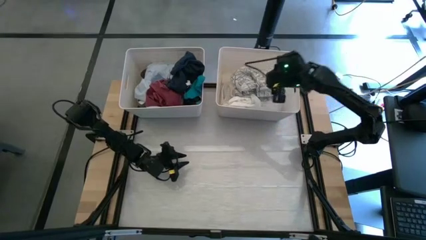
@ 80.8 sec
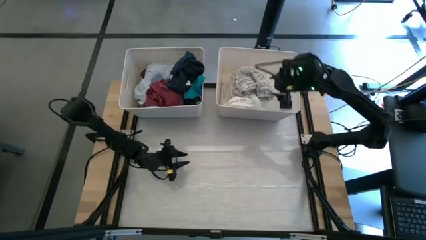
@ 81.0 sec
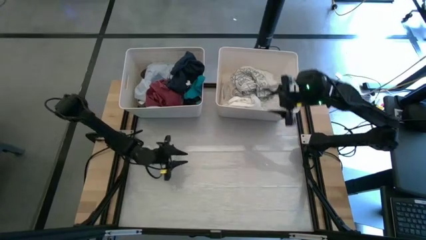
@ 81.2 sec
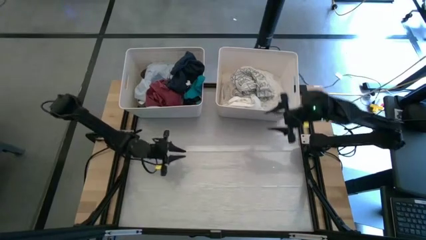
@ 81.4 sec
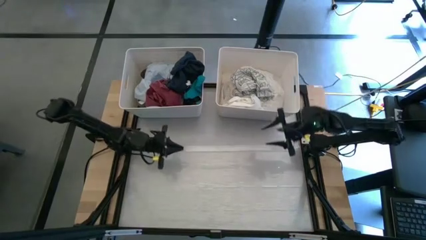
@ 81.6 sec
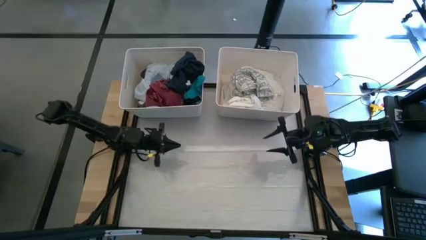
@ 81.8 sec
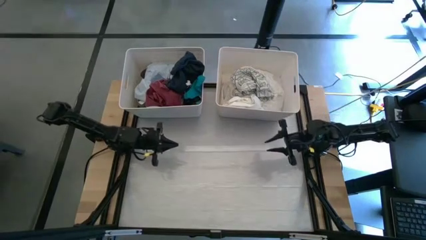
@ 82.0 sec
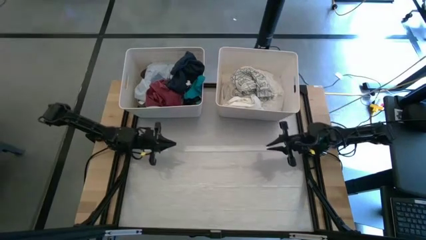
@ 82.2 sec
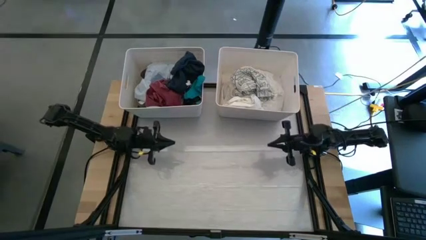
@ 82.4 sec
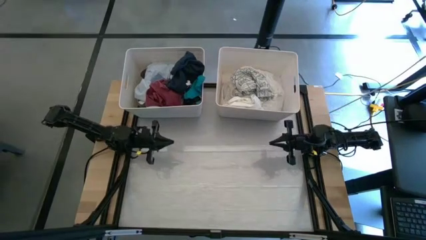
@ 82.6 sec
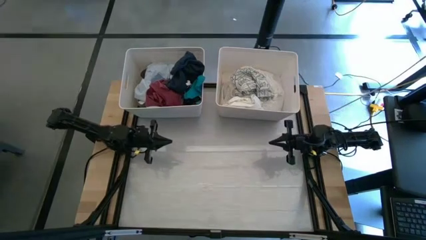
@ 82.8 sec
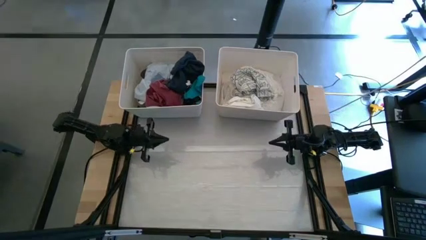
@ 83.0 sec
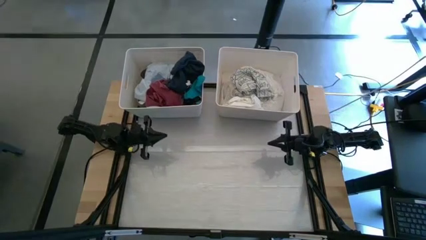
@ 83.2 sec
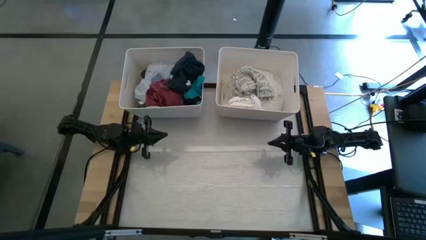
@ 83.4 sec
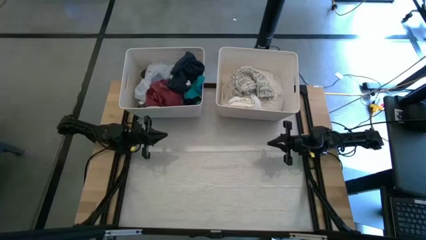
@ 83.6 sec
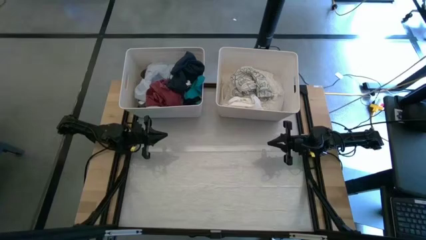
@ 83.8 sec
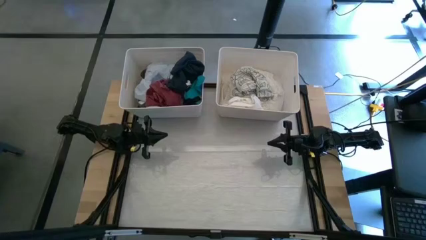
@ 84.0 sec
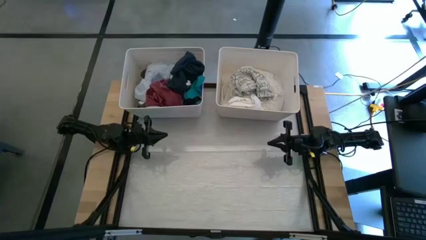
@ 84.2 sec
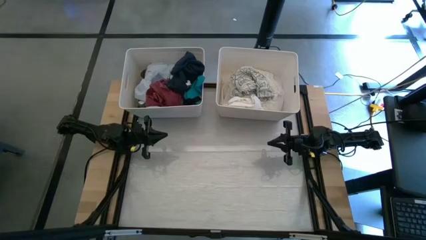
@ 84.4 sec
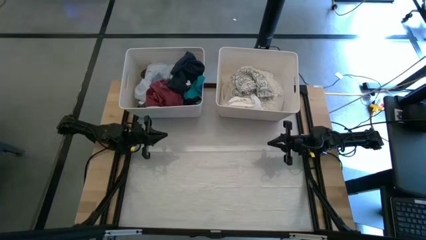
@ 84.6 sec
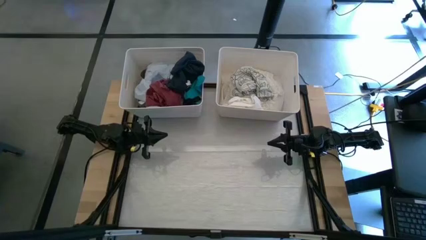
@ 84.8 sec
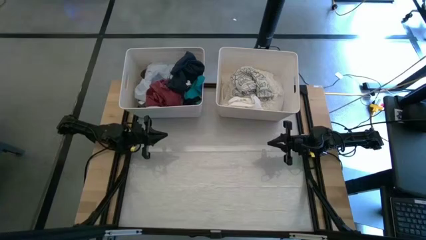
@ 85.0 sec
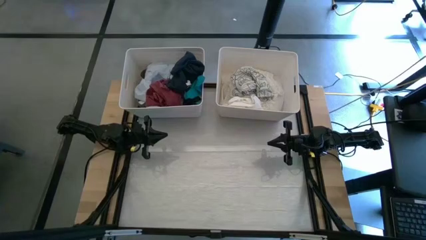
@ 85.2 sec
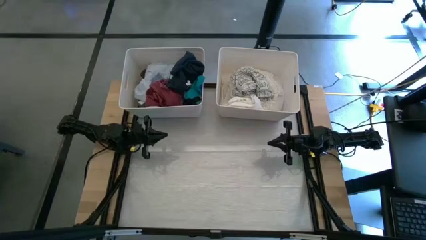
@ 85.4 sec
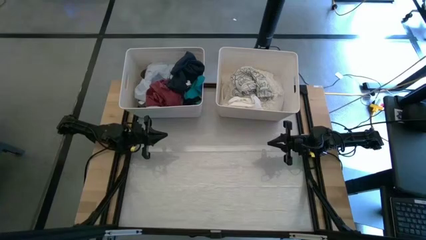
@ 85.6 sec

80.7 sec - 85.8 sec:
Task: Sort clothes
Return to Home Position

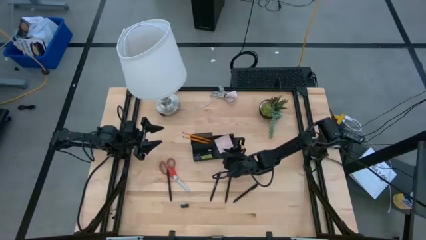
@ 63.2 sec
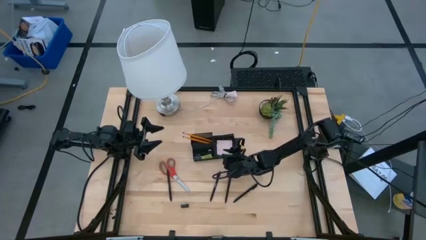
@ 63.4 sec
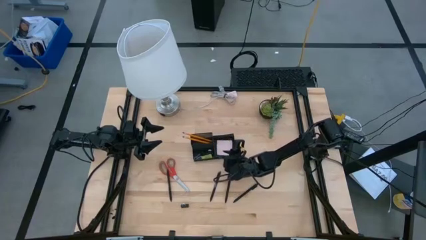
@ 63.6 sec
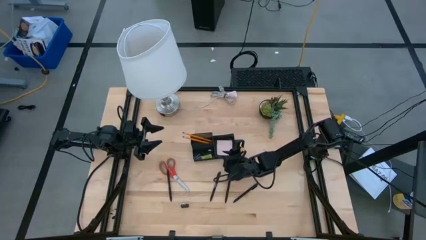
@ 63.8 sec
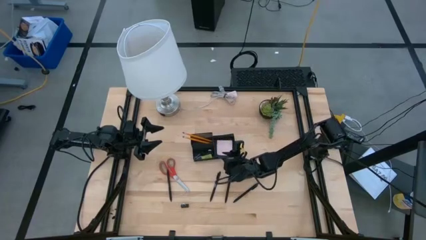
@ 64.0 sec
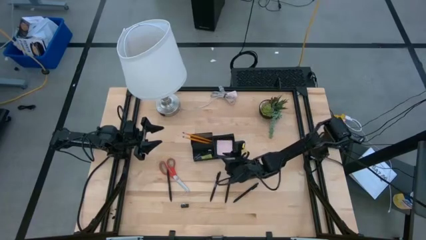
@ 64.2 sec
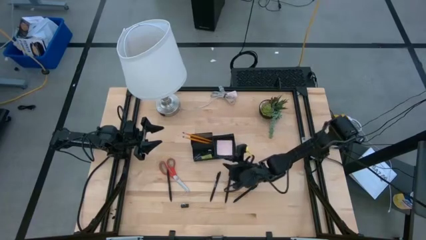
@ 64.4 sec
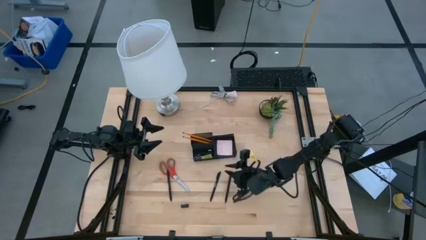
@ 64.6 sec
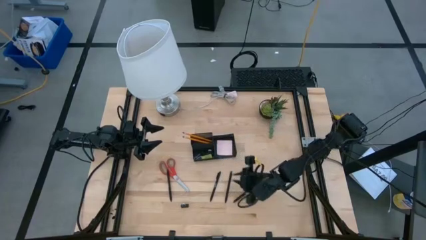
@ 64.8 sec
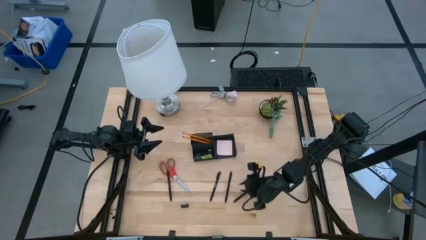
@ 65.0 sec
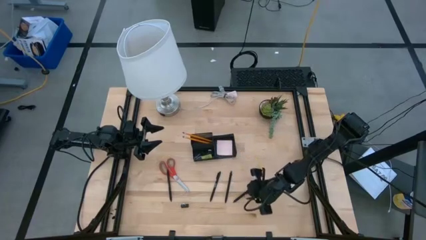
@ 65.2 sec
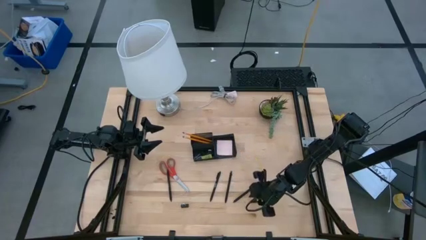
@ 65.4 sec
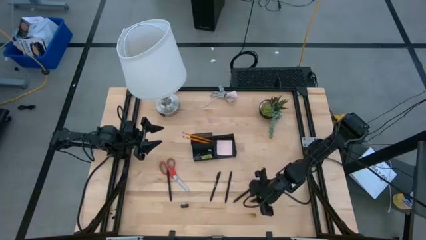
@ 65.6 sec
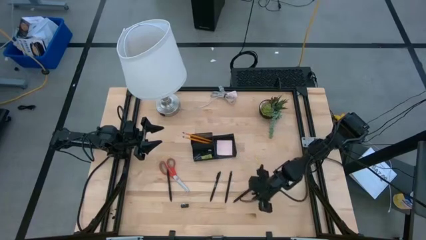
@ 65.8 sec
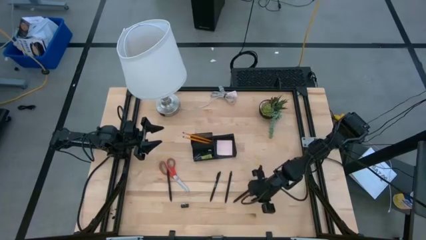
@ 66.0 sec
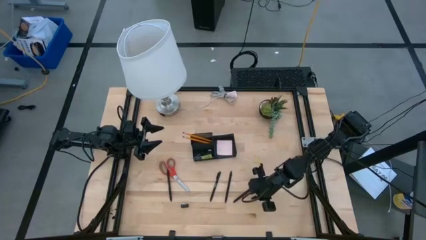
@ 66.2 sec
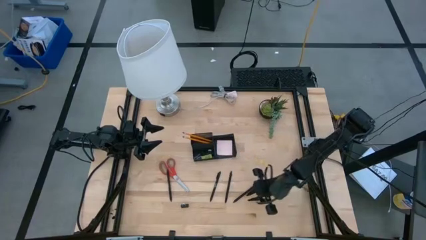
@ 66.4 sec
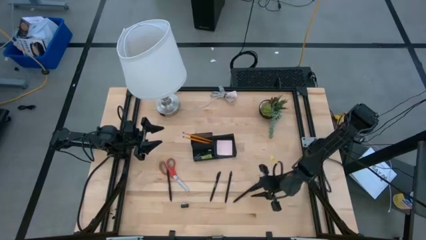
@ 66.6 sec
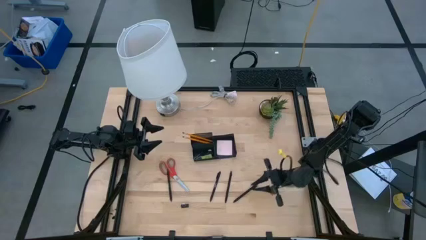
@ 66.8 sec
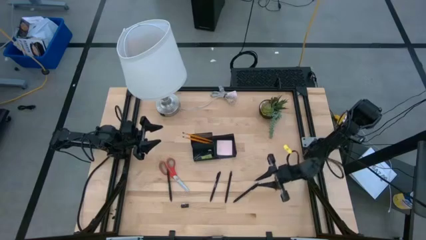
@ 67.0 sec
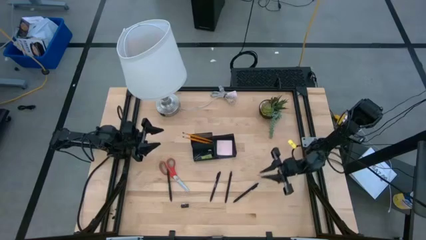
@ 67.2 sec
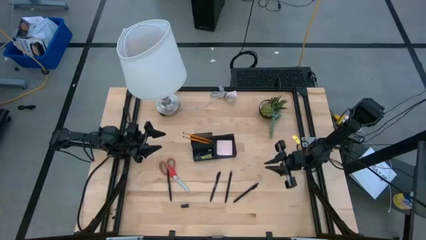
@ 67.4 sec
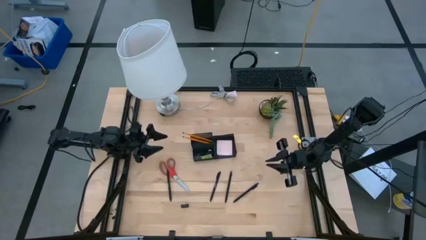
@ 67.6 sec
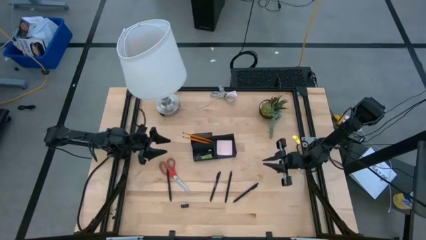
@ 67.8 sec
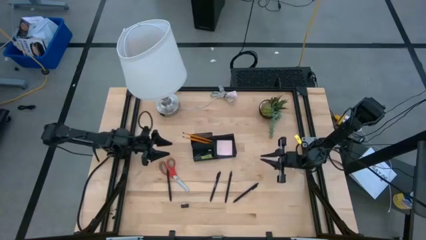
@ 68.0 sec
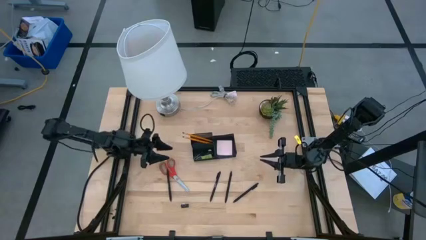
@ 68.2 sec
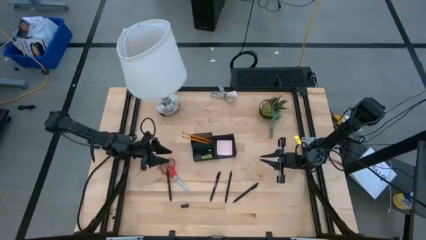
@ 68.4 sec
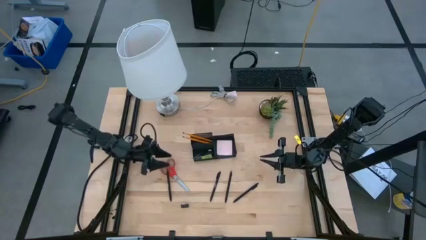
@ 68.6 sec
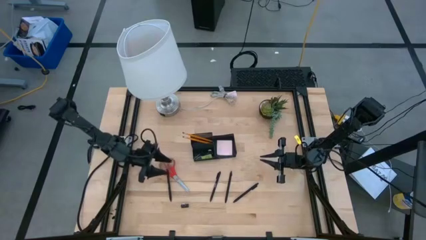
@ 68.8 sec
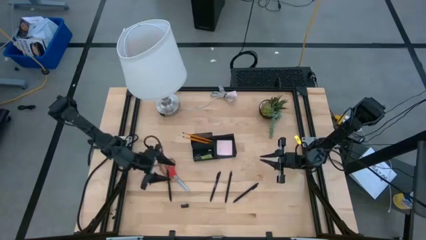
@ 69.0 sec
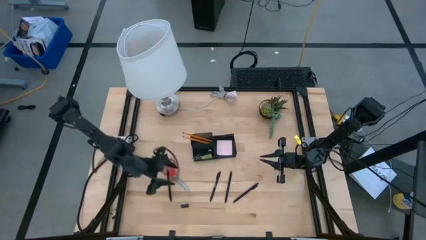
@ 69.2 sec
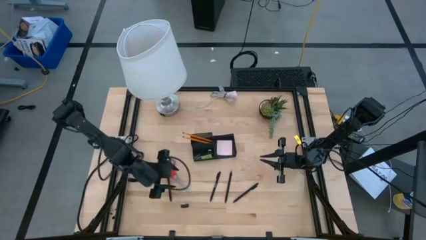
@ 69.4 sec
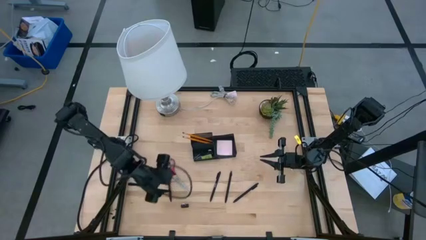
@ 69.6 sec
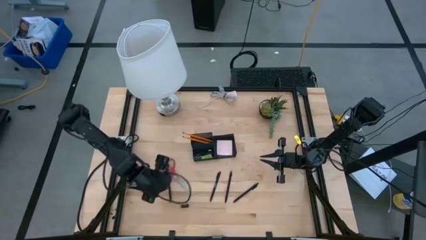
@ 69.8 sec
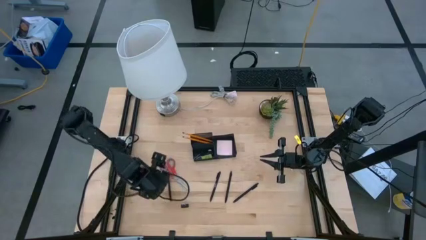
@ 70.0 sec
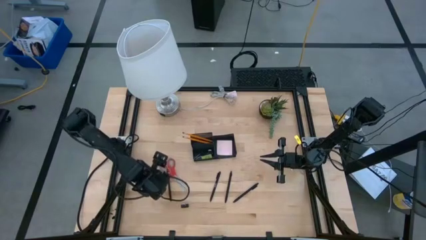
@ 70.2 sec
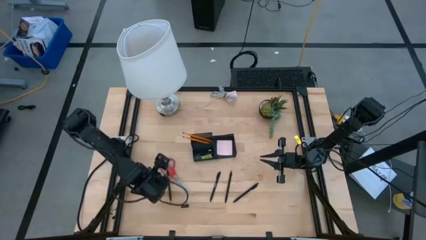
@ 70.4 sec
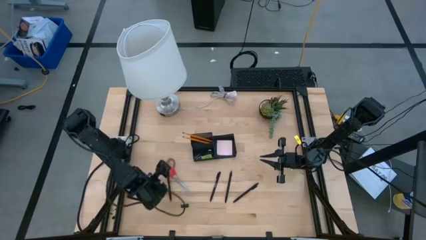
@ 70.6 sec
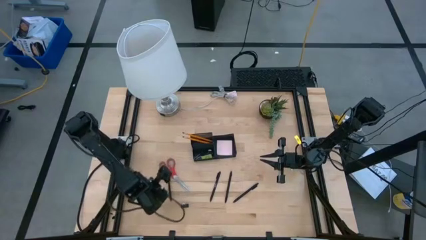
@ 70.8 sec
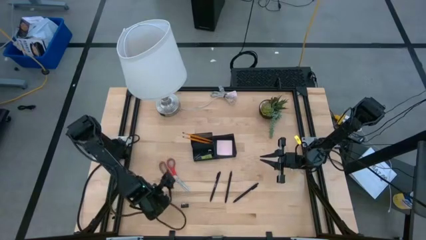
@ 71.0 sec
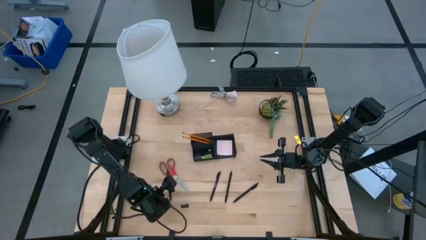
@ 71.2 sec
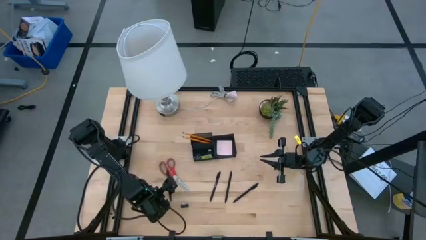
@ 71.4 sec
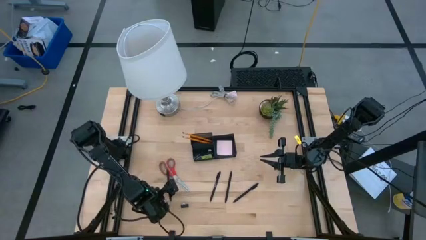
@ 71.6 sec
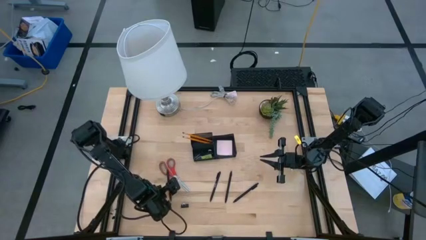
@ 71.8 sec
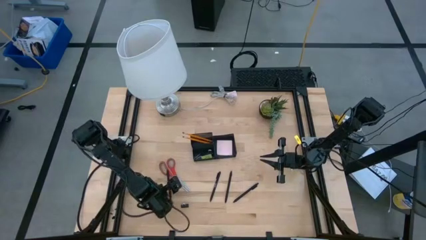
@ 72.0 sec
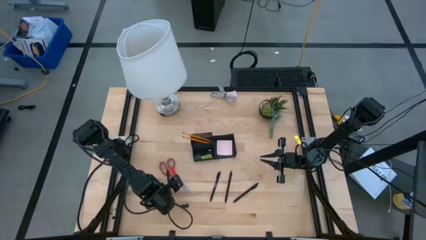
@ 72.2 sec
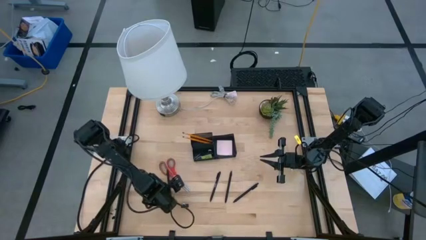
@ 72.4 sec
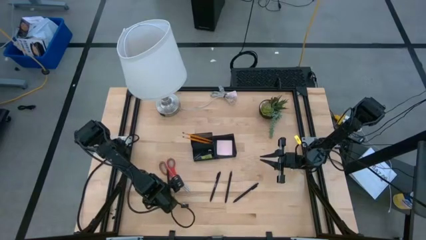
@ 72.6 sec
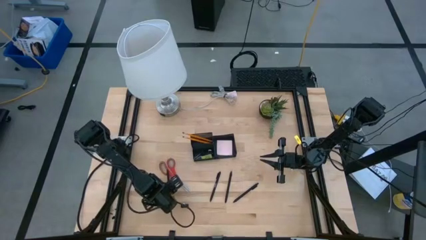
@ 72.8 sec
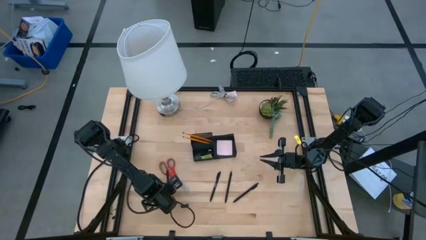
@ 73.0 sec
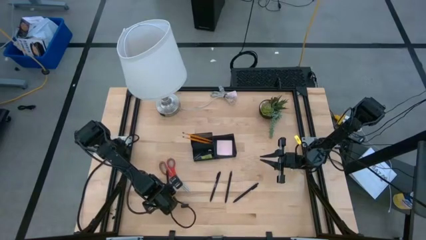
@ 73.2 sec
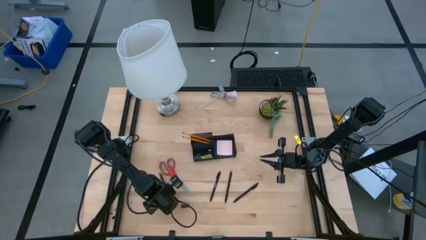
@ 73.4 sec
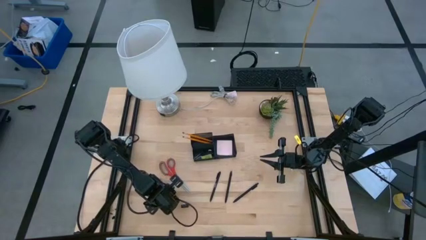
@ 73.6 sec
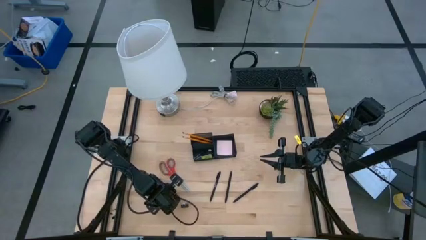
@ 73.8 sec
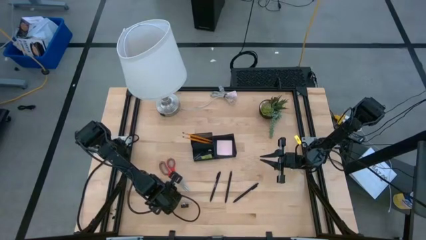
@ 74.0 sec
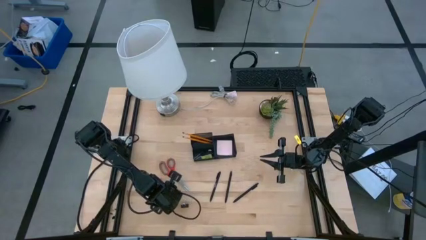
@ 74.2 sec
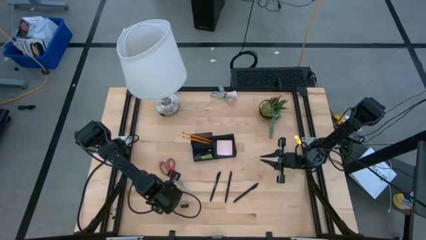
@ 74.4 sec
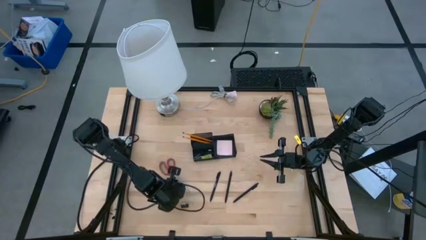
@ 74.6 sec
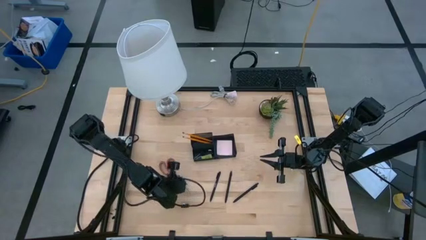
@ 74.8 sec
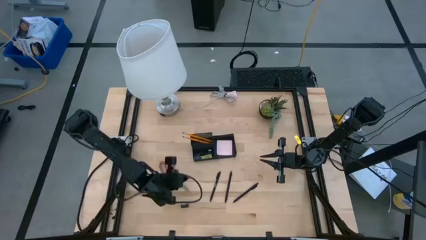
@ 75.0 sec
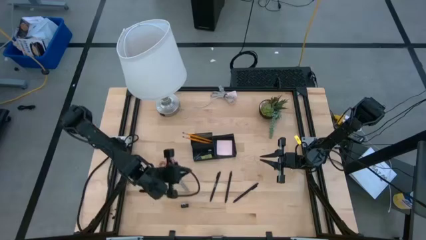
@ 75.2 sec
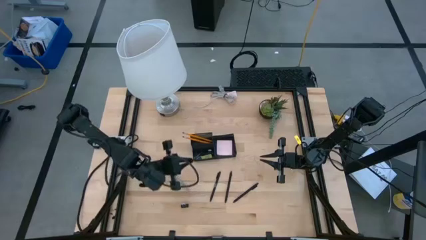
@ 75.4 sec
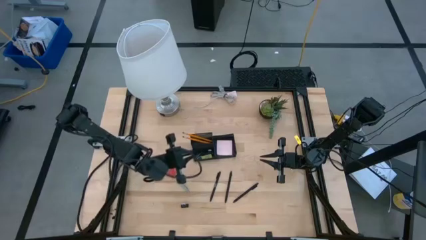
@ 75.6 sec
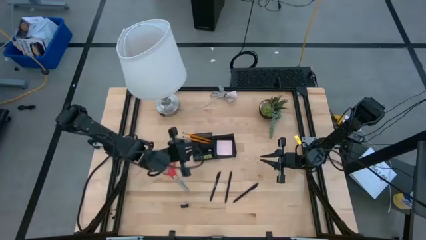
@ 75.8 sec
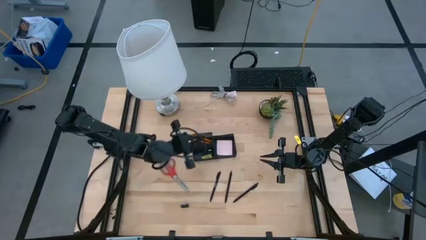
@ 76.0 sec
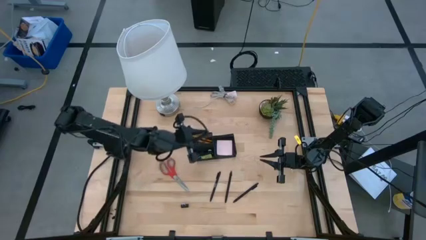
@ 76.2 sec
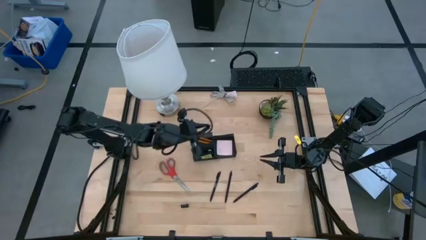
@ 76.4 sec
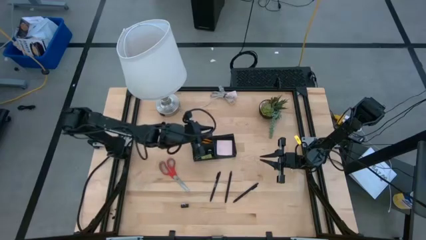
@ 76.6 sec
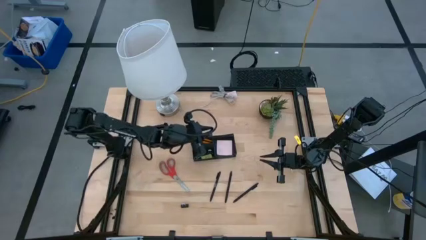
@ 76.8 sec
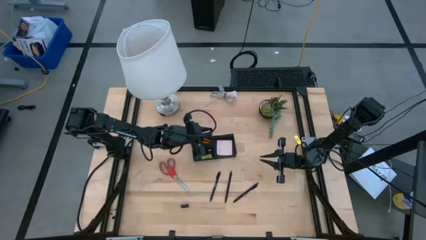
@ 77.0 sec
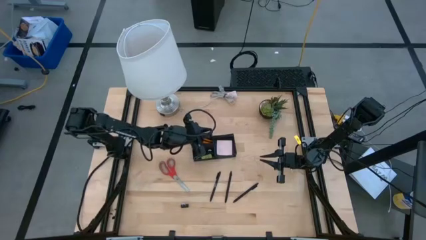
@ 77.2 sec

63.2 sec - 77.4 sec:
Task: Pick and place office supplies into organizer
Put the black pen into the black desk organizer
